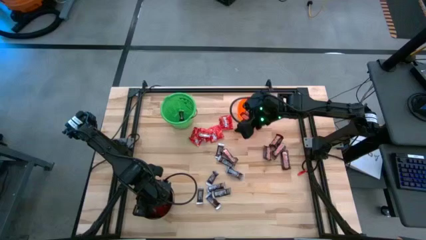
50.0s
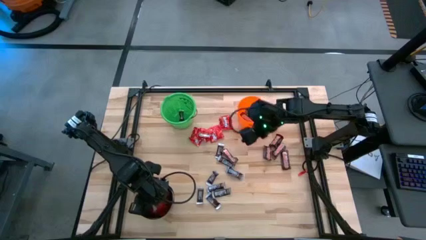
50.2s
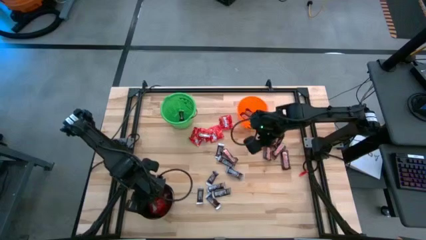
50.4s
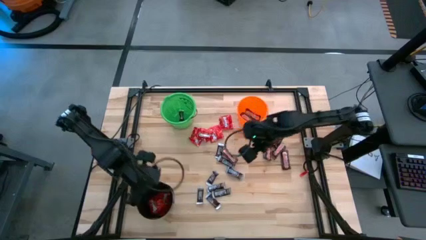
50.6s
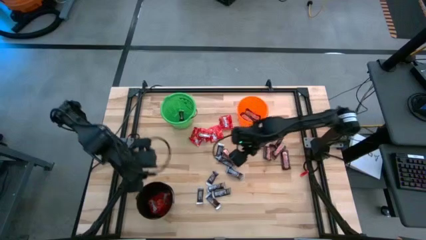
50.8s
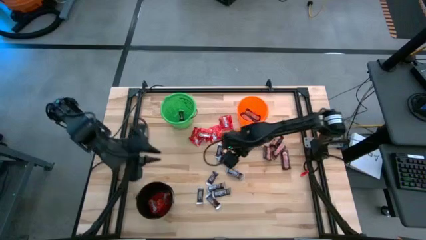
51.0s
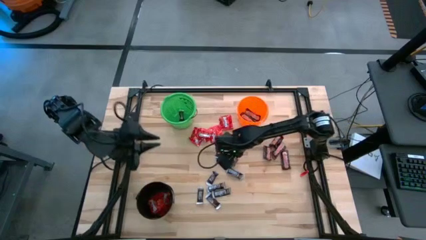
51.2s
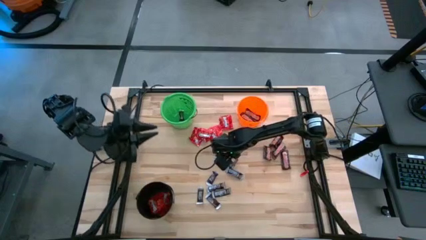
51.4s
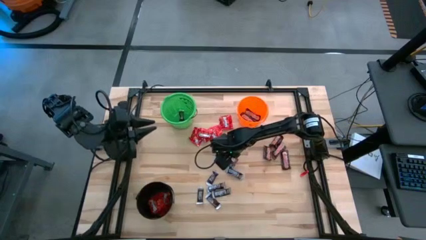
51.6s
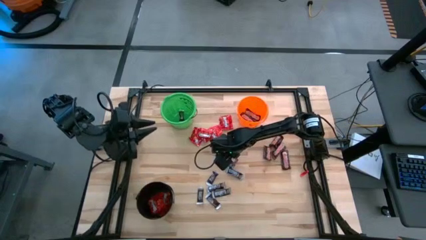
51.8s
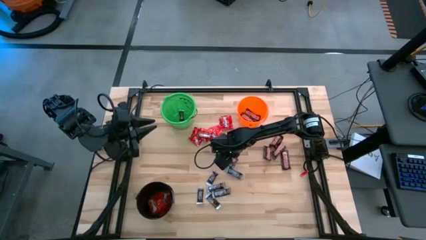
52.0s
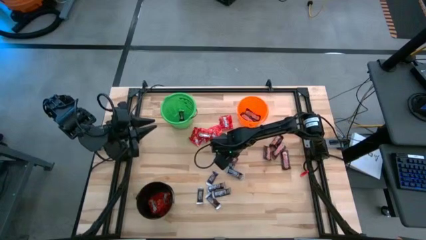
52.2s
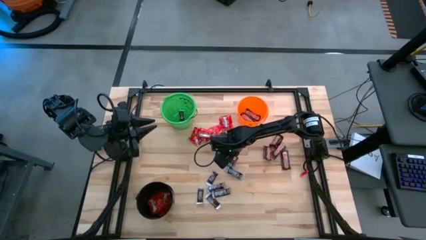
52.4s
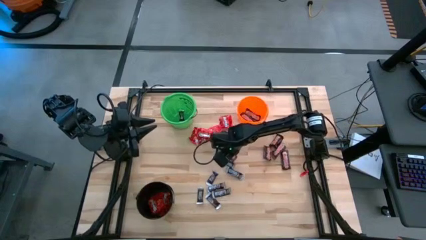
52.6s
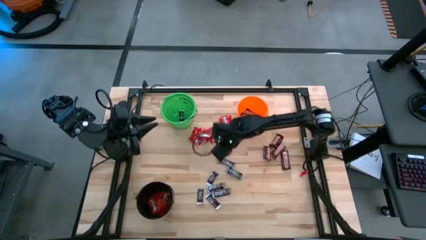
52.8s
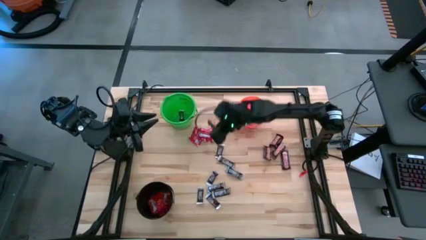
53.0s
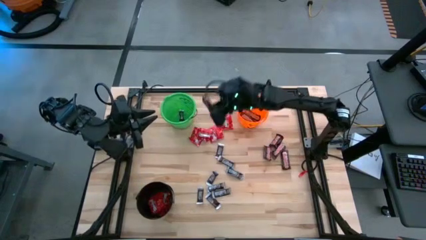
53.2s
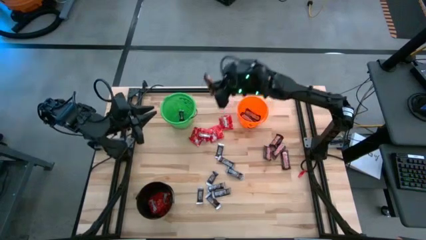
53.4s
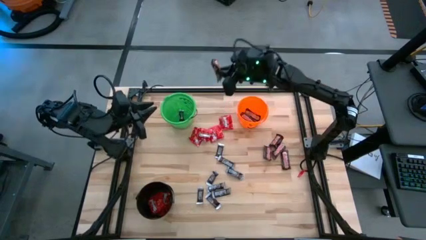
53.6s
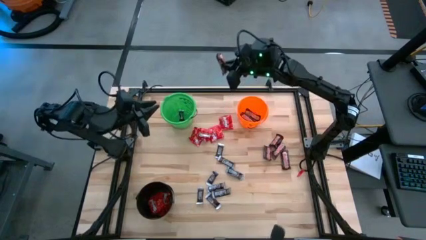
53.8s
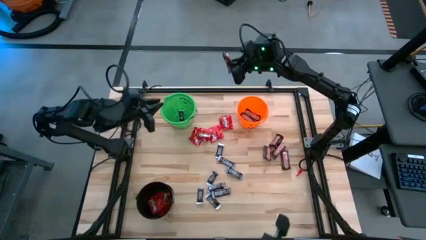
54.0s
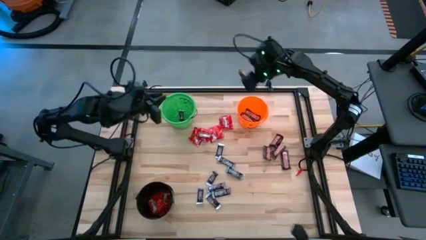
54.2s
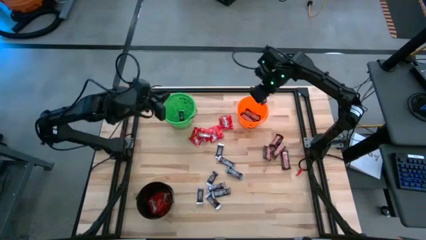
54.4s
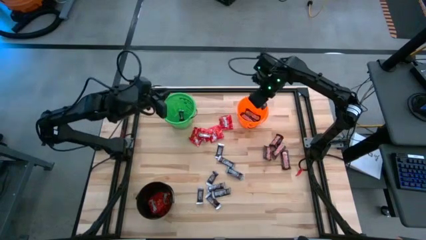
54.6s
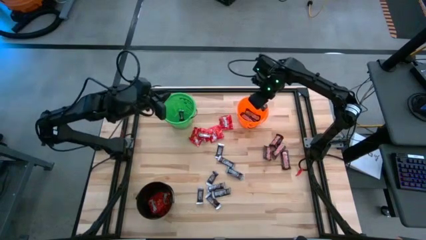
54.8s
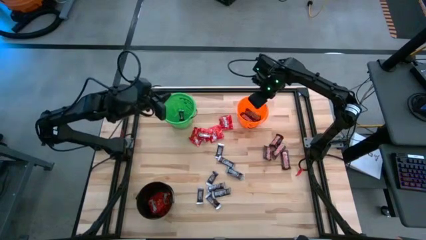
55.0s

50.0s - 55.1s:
Task: Sort candy
Put the brown chocolate into the orange bucket

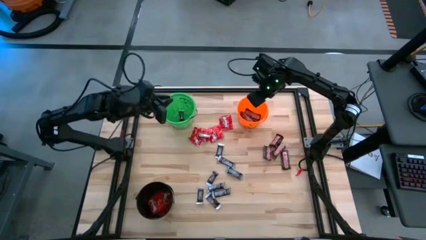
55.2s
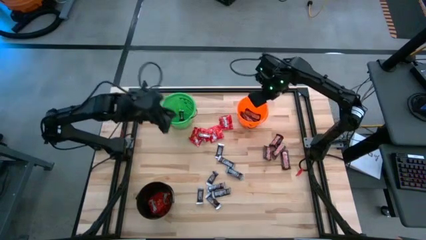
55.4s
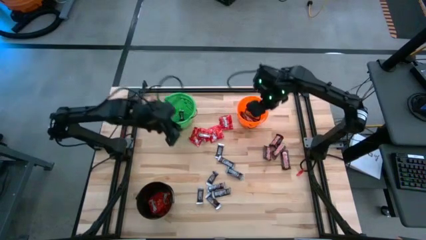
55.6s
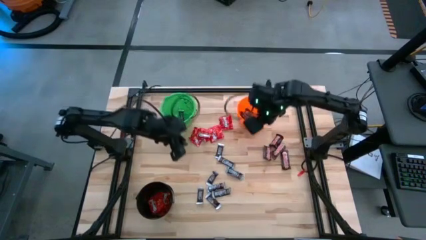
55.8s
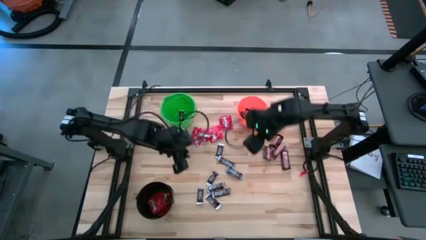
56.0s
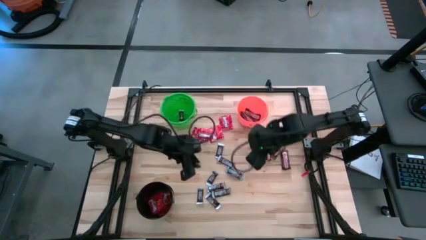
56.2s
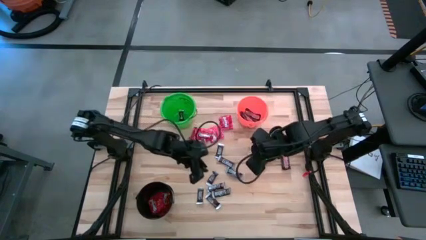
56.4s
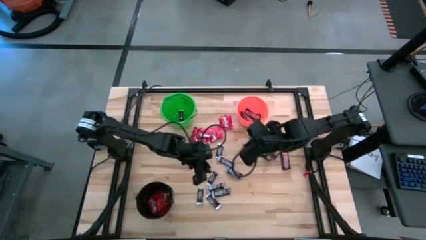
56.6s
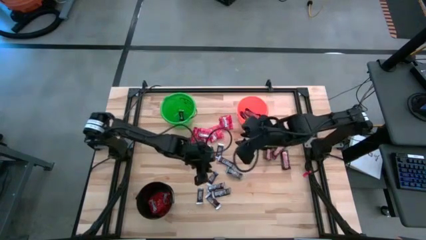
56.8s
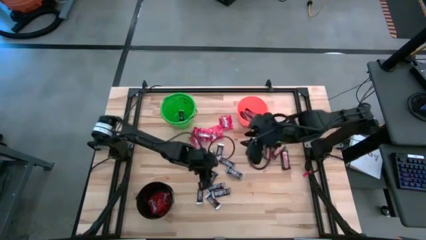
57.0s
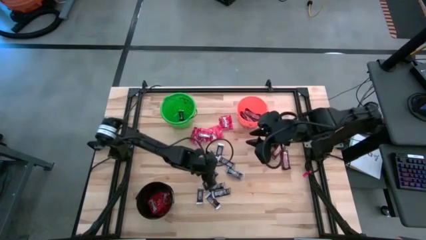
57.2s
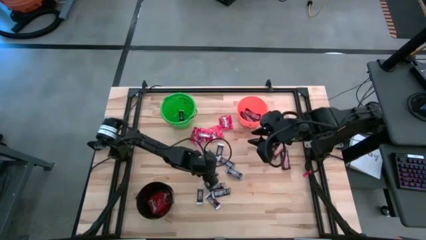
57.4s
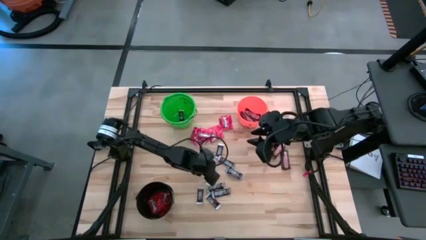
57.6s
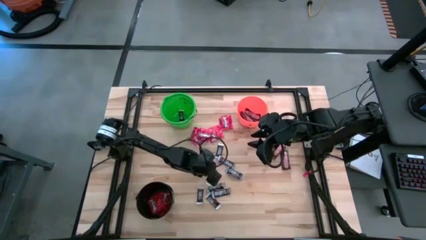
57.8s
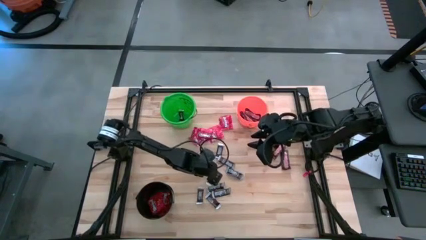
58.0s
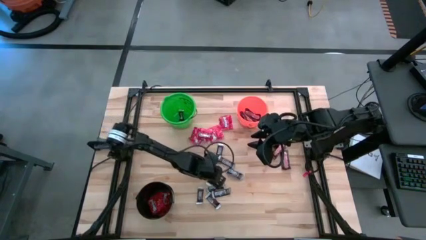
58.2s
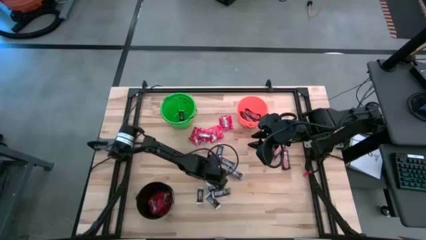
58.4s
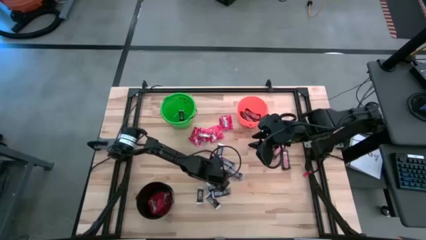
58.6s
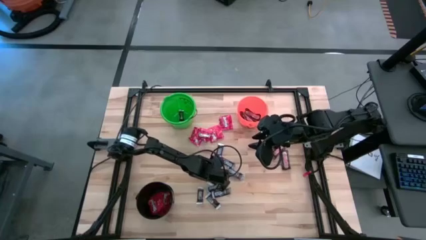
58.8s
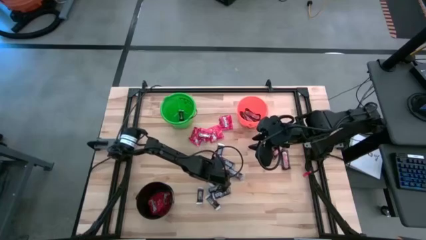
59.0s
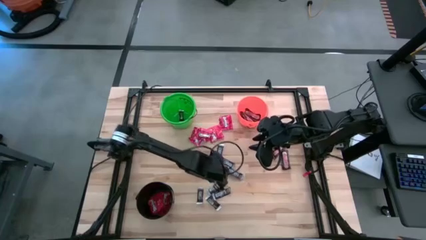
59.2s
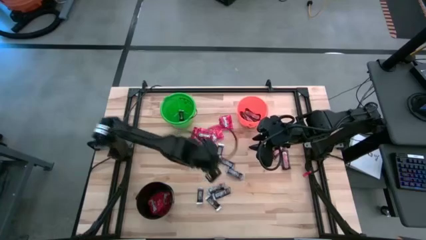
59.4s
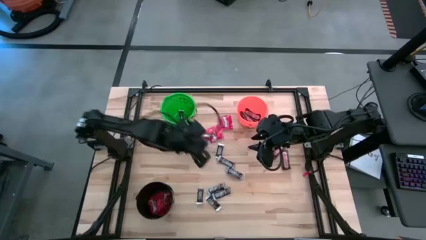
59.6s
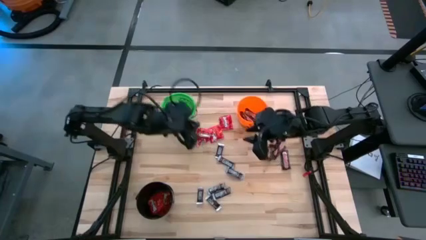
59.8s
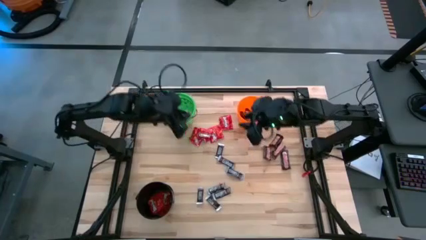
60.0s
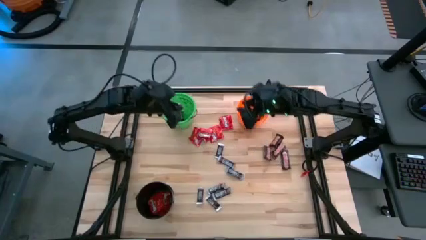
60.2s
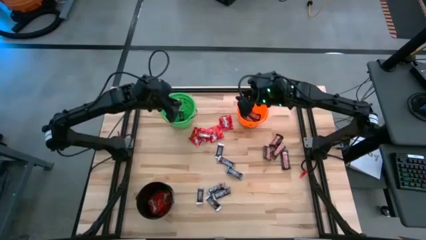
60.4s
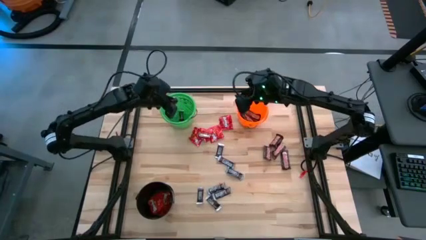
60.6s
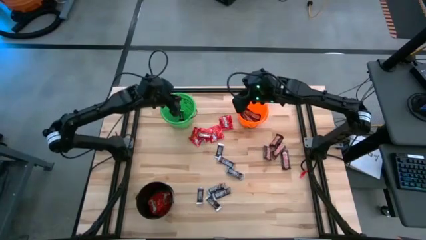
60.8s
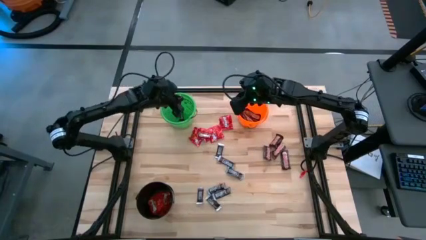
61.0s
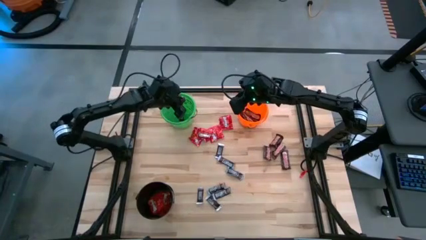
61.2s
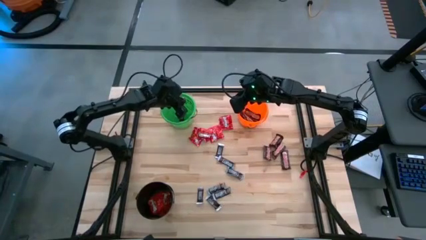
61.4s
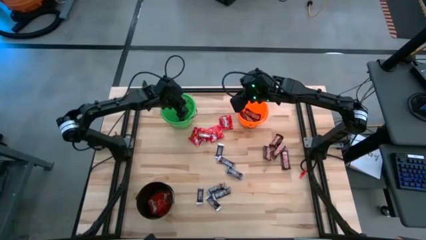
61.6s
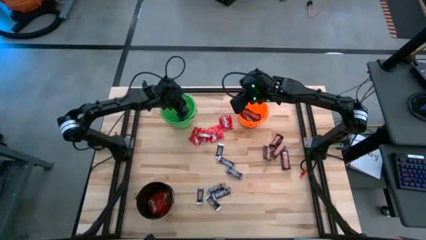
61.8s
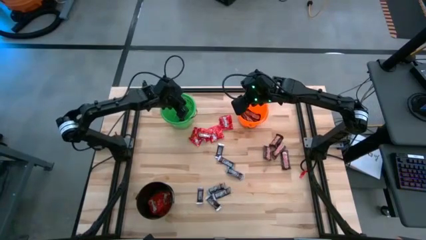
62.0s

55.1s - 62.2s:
Put the black chocolate into the green bucket

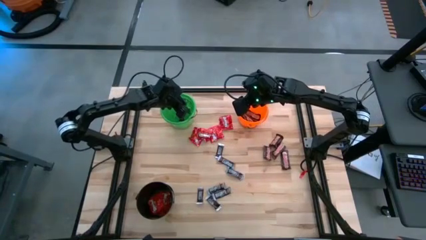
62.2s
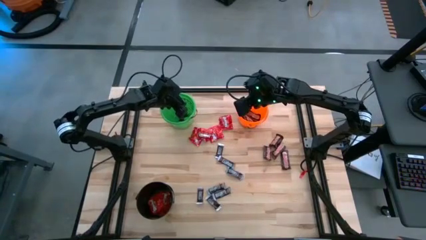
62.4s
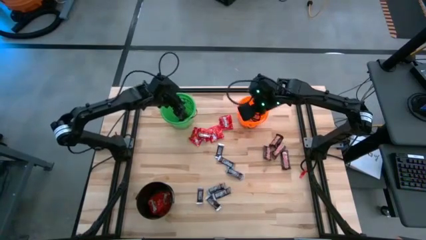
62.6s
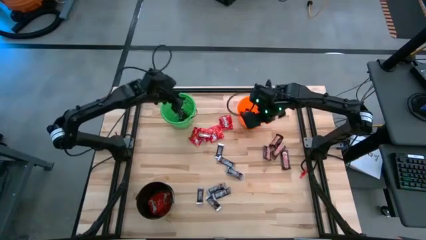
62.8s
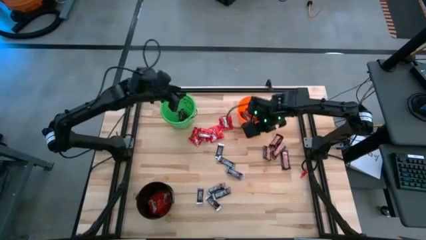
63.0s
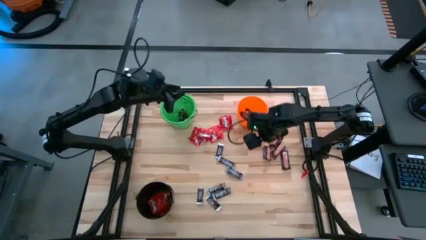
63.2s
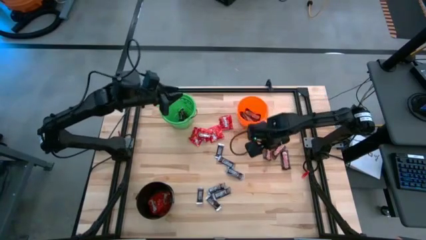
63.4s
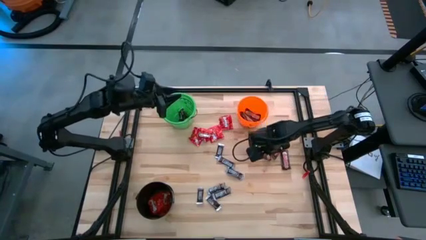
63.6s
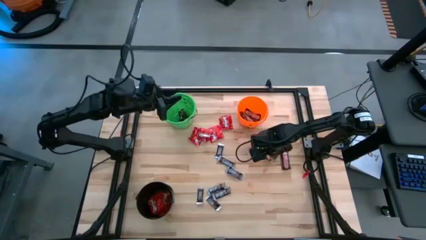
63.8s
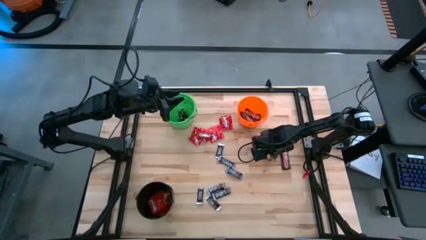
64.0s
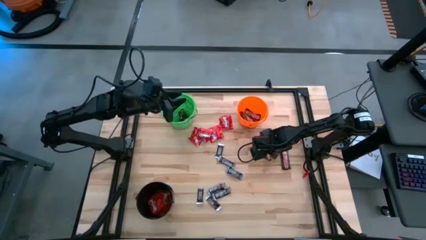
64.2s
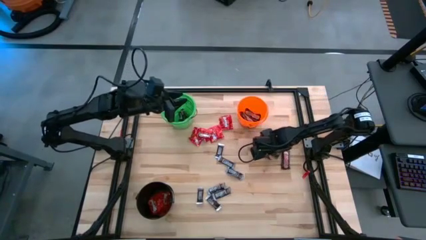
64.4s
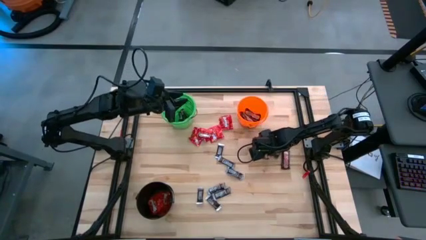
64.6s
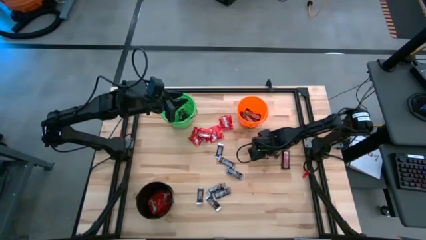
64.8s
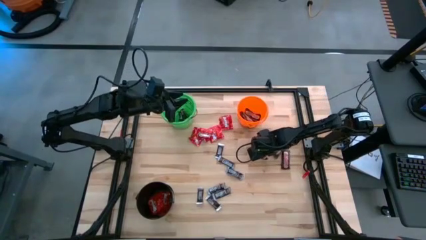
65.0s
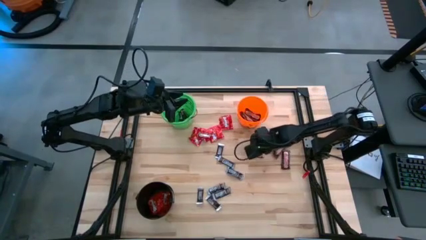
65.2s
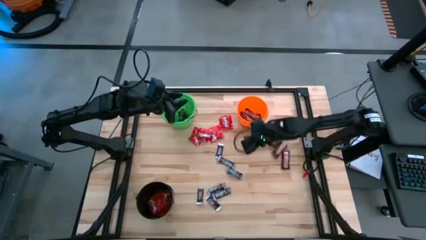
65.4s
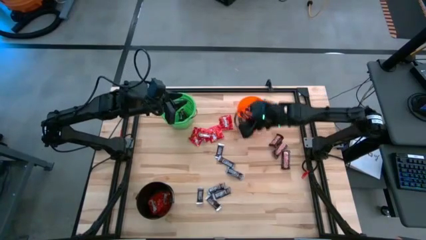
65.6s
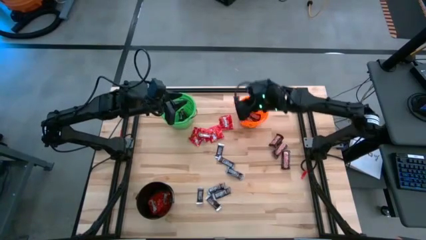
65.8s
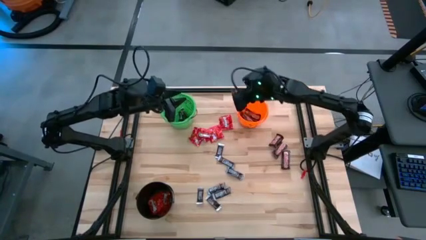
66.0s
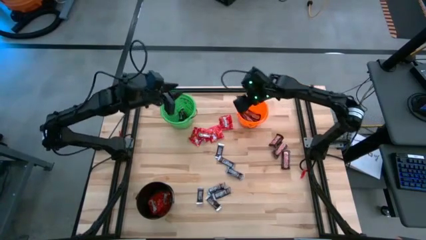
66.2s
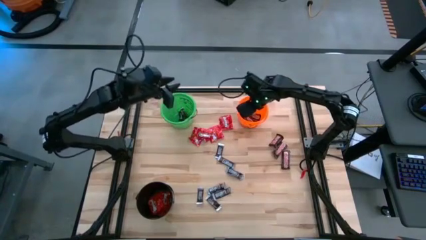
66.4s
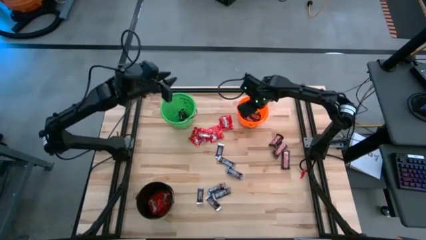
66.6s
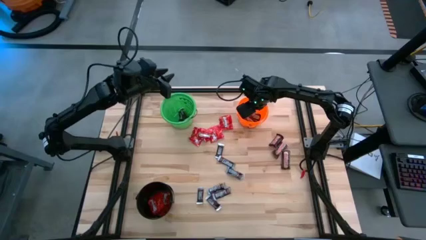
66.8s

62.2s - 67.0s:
Put the brown chocolate into the orange bucket
